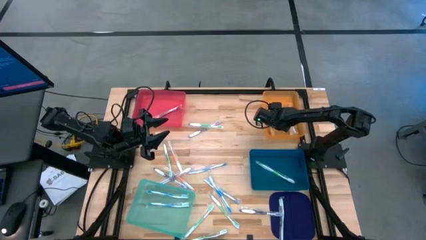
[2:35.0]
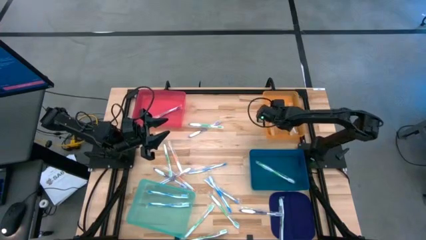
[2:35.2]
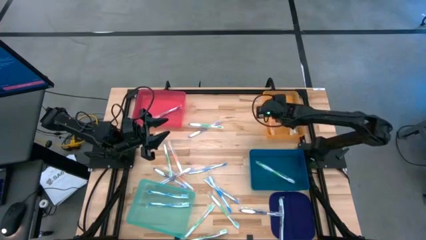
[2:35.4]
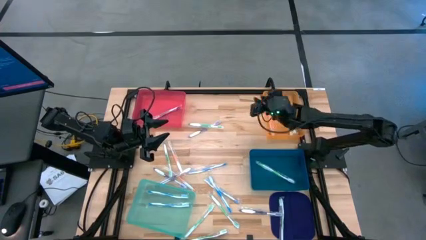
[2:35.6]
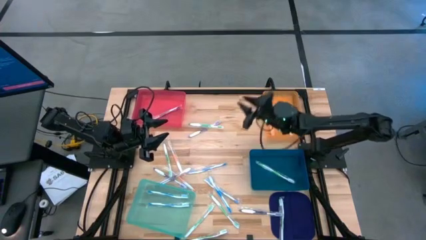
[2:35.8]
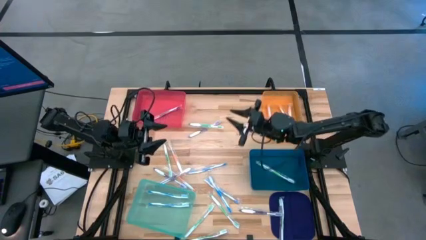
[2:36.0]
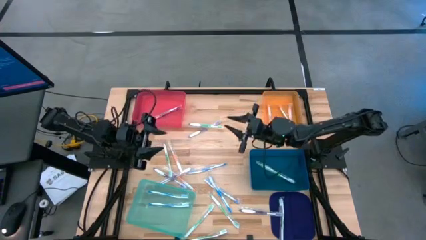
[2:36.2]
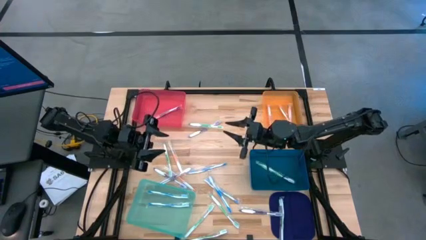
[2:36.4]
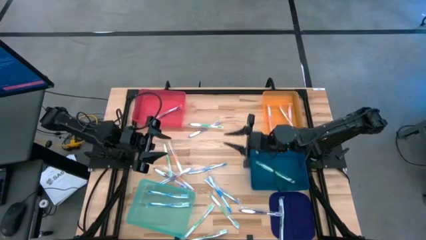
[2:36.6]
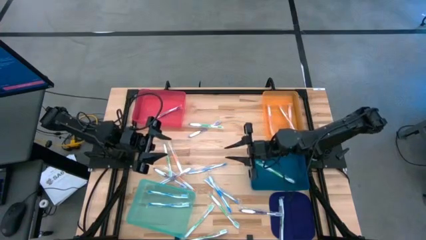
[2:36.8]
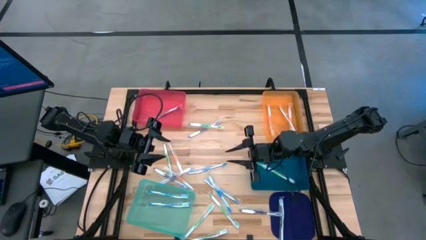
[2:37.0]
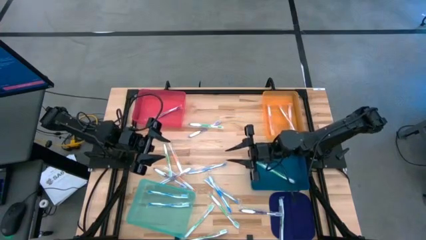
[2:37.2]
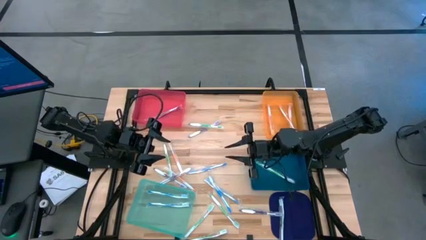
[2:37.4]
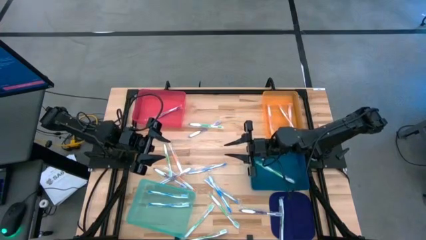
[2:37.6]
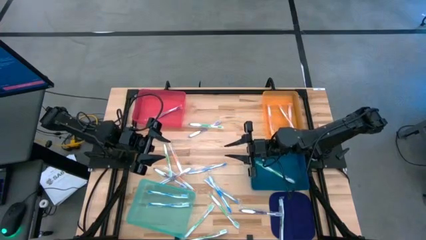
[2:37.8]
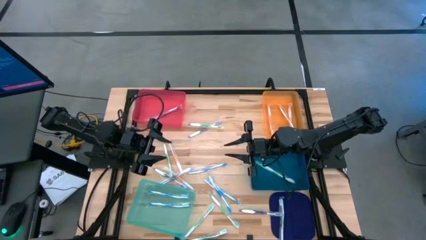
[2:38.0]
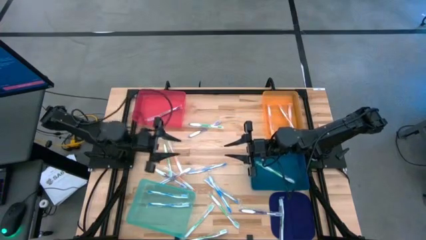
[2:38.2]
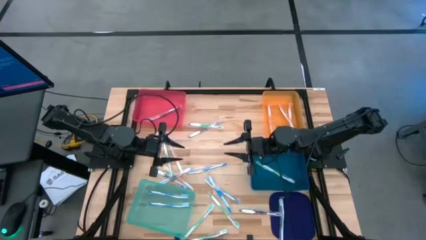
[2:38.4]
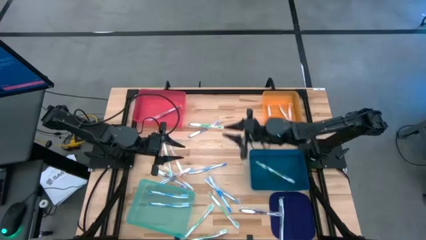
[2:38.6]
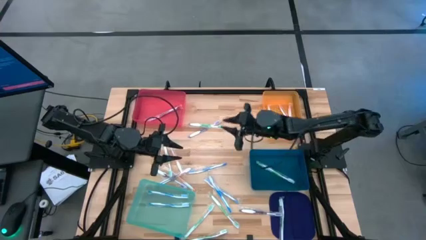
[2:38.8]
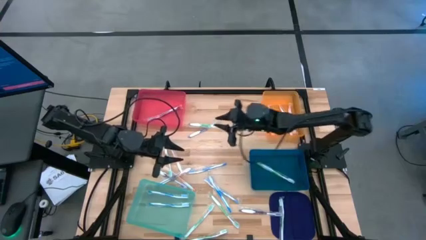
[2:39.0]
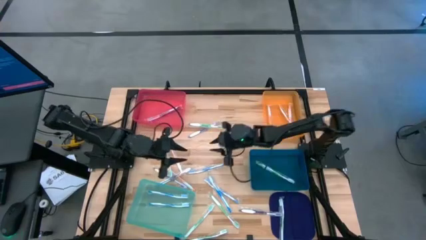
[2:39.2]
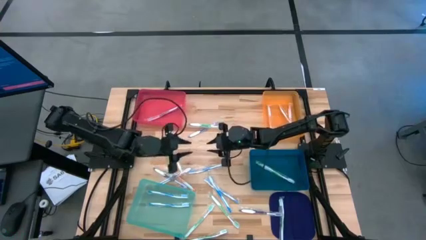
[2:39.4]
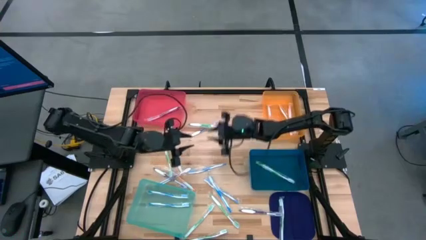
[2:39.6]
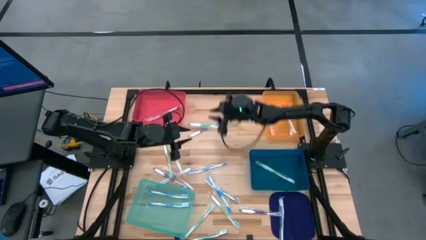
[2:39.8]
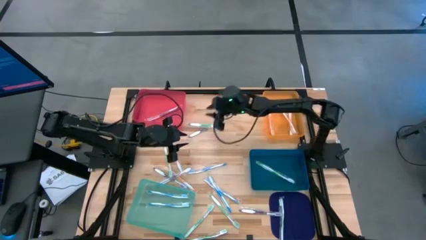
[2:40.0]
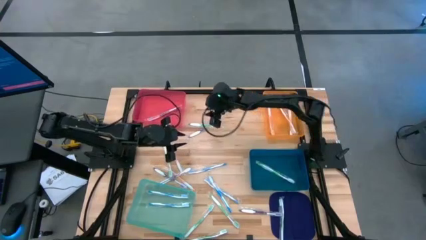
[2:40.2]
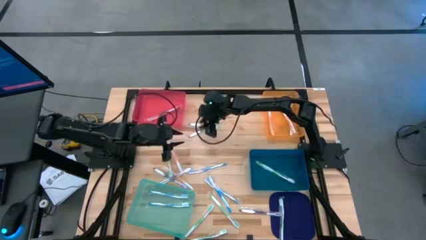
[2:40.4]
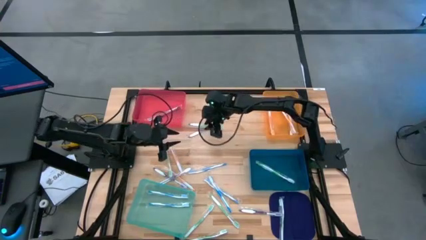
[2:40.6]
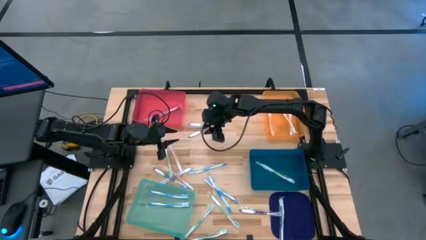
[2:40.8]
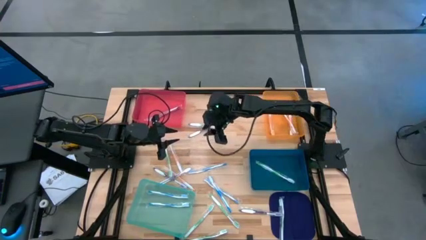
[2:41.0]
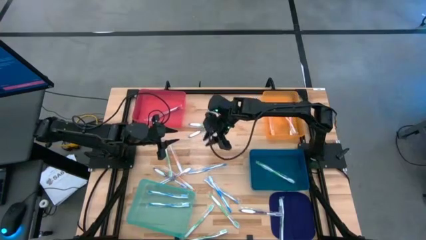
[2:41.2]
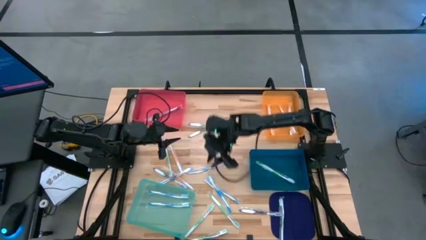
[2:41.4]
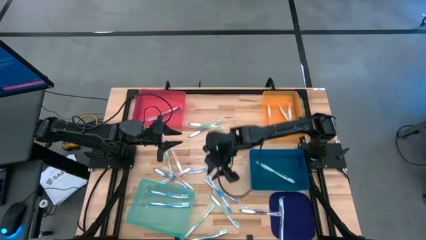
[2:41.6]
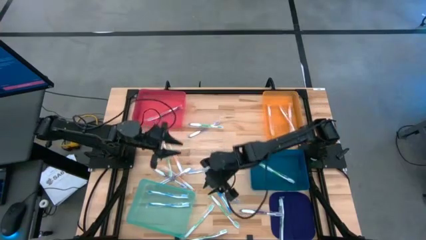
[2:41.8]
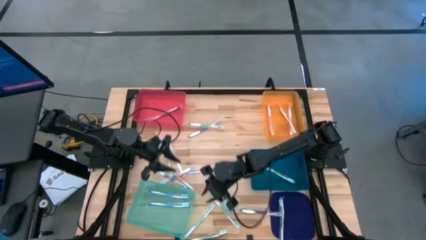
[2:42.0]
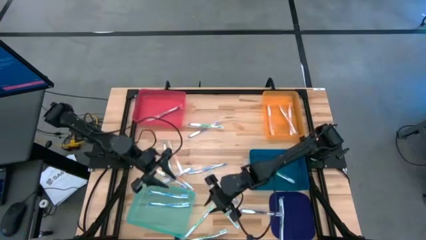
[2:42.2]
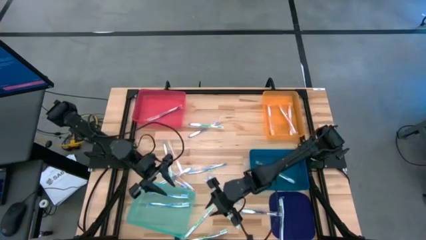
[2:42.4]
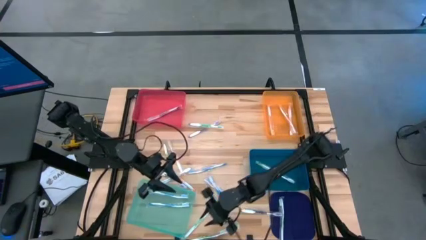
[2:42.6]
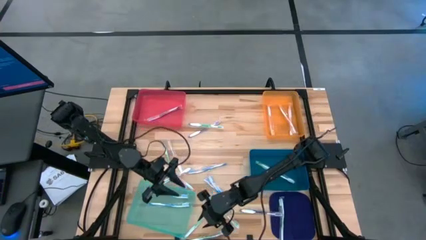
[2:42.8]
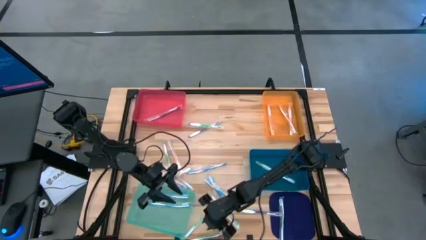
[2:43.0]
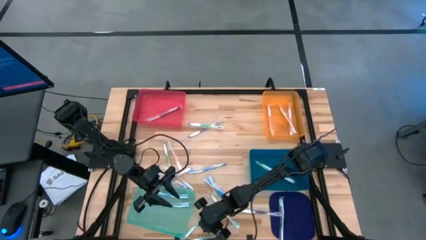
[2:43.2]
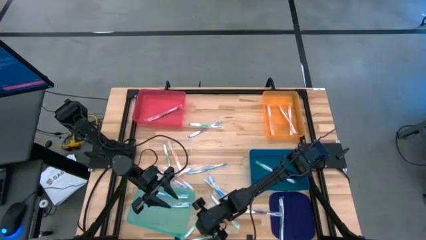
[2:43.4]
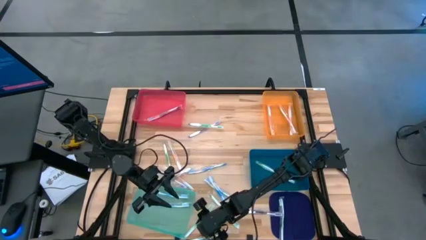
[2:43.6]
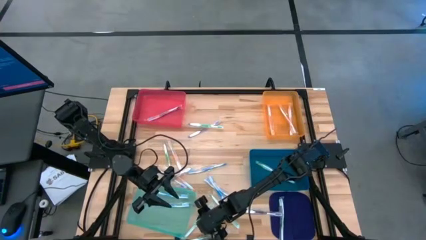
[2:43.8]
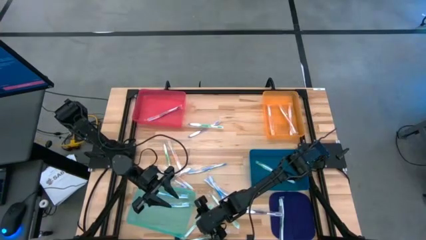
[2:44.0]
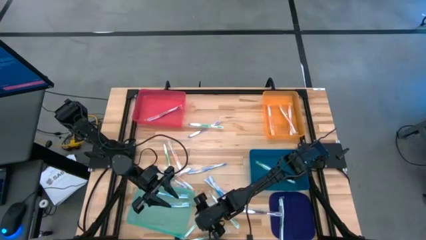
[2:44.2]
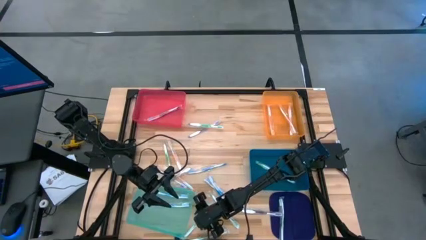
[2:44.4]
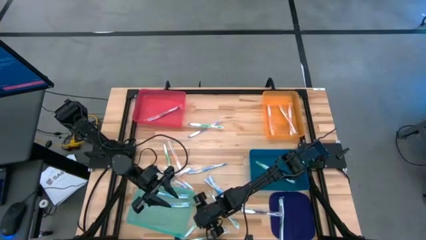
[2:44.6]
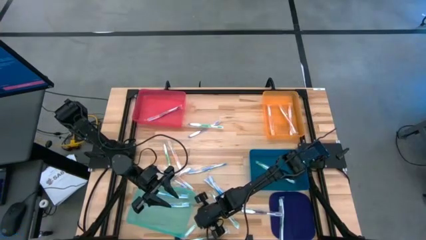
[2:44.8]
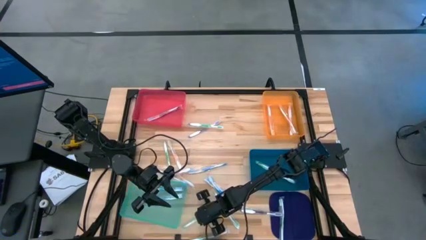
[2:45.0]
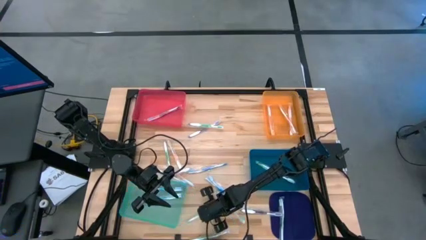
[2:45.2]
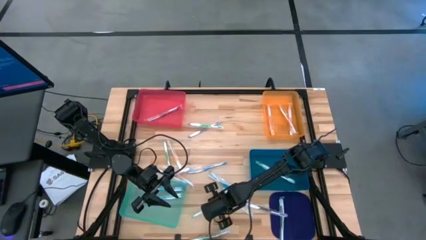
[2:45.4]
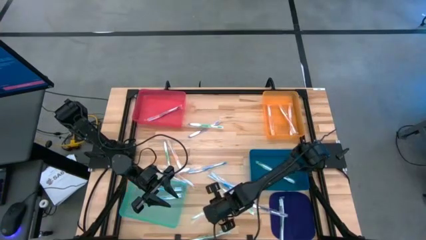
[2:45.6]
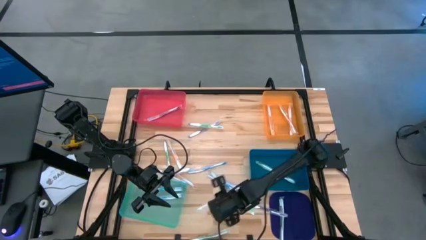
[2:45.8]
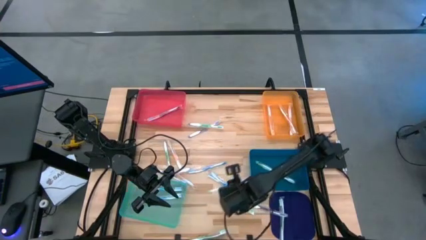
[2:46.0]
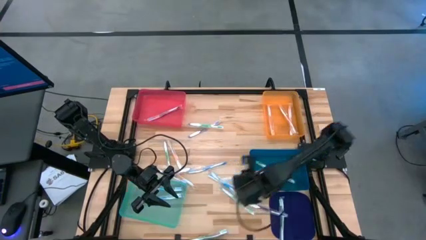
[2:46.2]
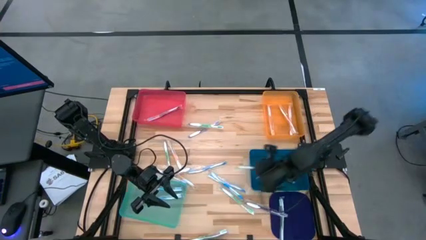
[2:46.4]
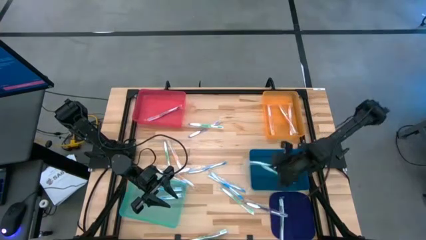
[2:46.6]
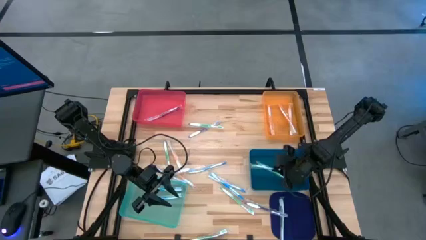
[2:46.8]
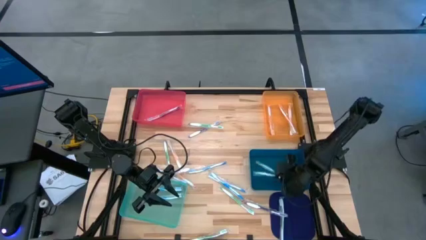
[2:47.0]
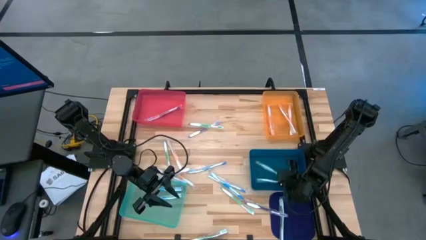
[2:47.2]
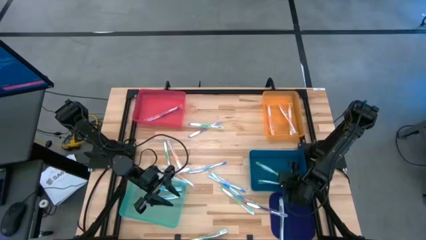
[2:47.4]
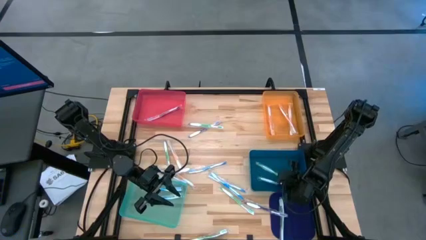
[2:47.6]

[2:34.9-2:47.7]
Task: Pick & Place Toothbrushes
Put the green toothbrush into the blue bin

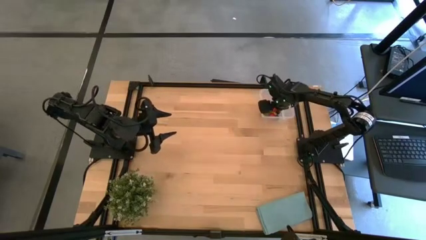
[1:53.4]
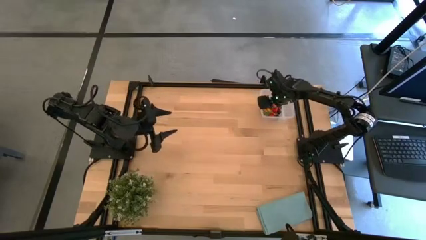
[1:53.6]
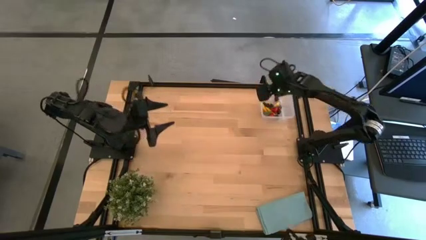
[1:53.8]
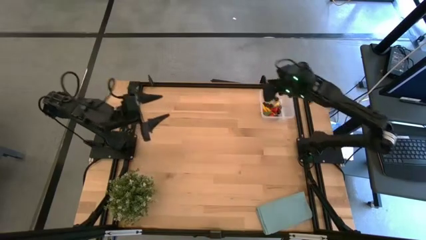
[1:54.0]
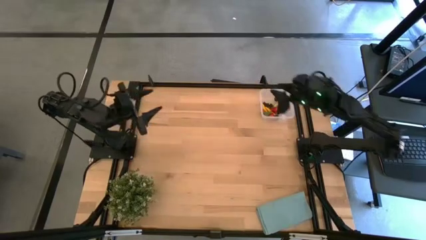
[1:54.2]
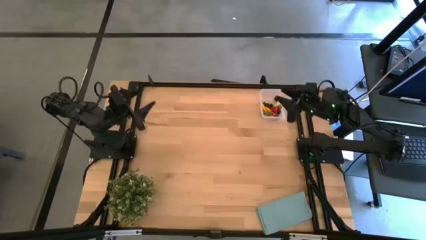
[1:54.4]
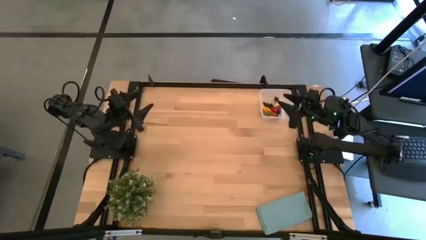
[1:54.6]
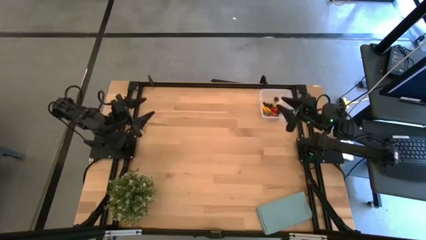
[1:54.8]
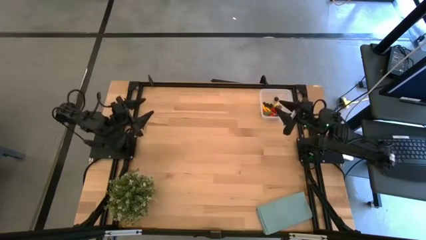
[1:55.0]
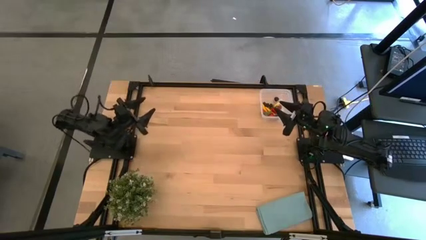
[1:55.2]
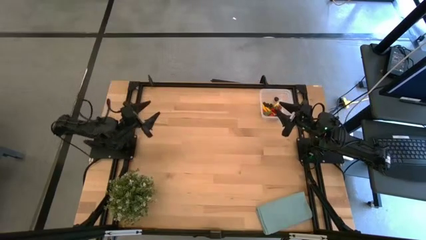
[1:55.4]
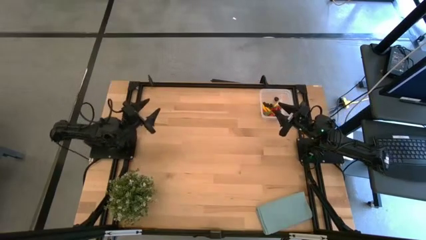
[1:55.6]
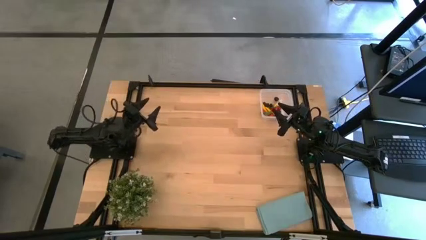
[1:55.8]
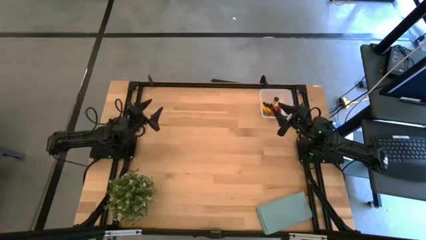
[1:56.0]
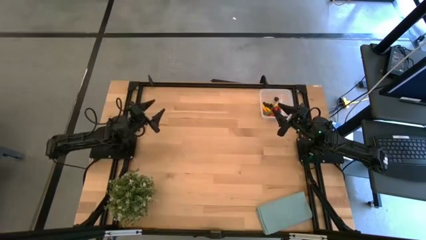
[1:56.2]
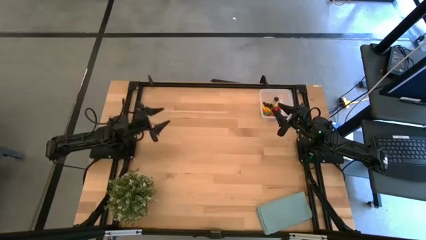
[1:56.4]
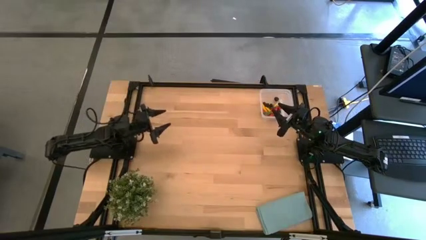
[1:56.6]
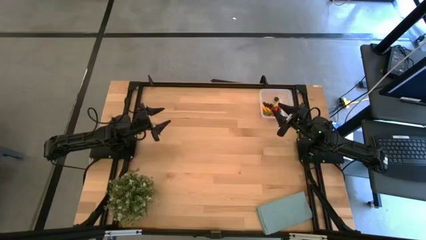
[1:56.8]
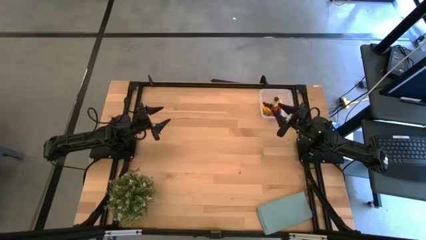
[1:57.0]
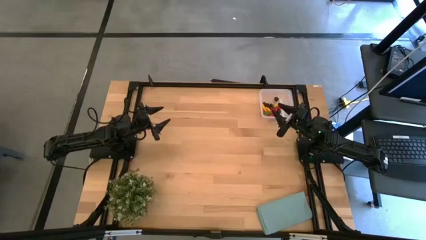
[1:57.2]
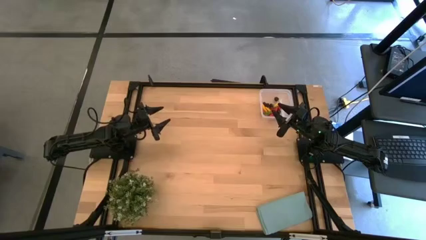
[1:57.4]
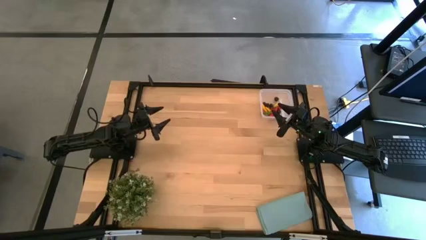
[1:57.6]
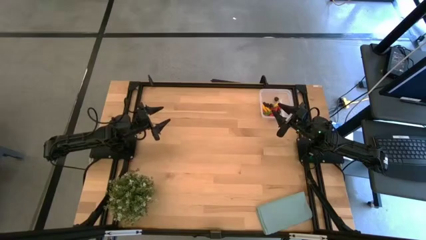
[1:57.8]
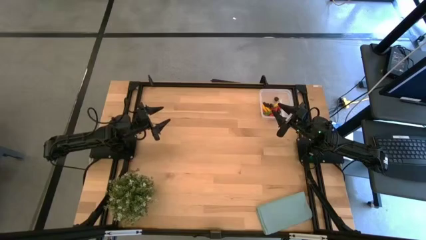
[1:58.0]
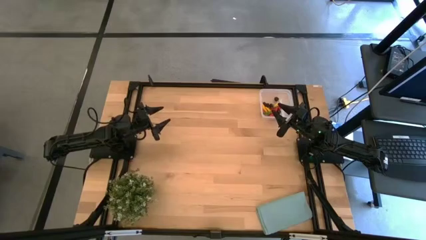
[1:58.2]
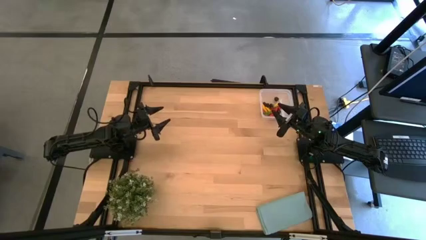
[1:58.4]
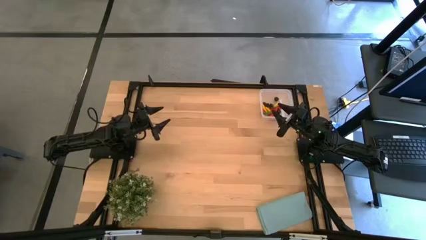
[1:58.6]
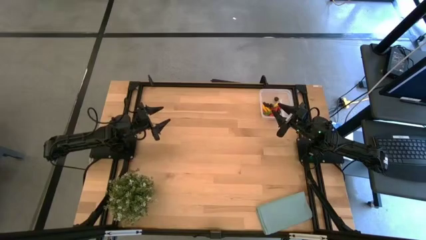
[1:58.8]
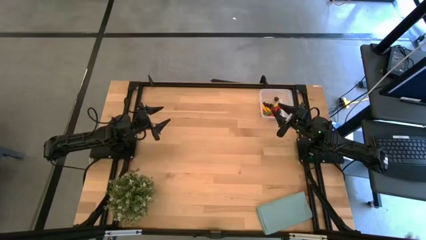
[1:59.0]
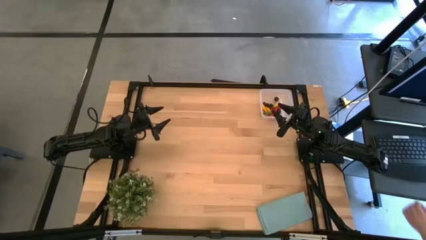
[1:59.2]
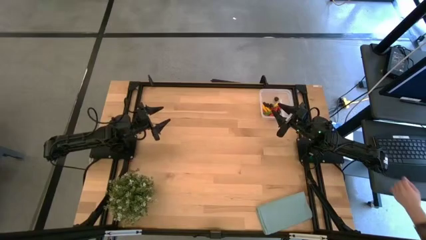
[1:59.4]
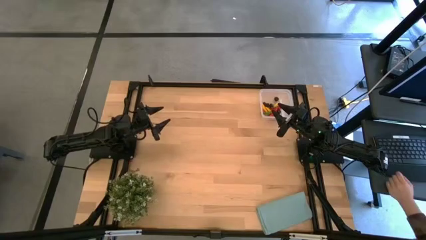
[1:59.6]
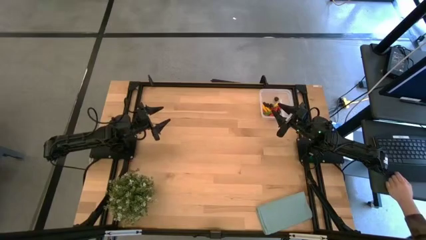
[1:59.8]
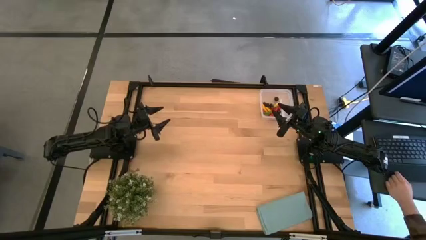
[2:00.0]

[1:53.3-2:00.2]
Task: Pick and placing Produce into tupperware
Return to Home Position
